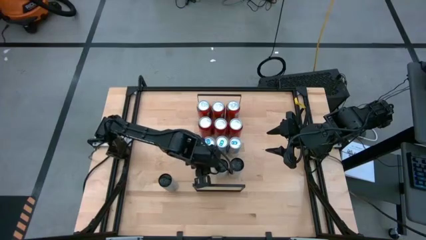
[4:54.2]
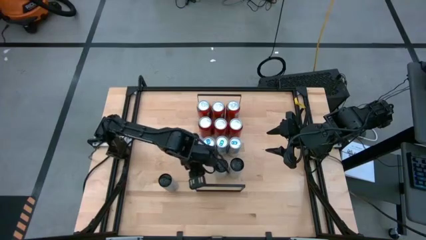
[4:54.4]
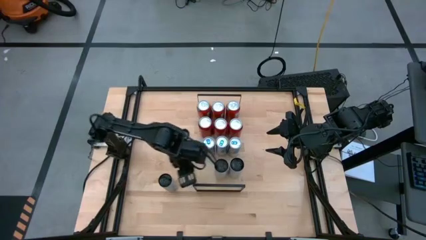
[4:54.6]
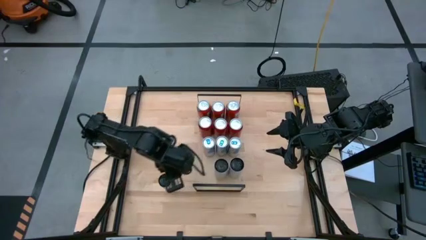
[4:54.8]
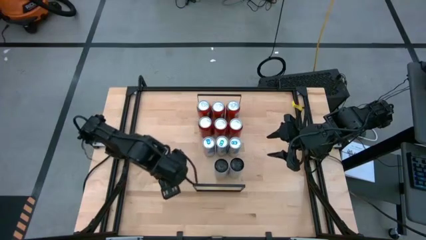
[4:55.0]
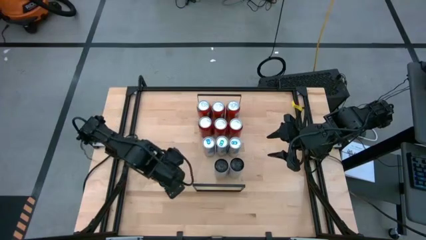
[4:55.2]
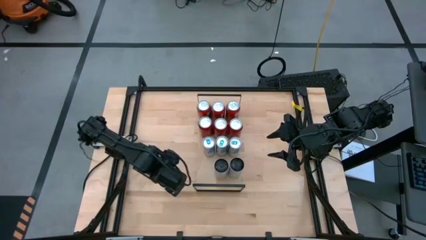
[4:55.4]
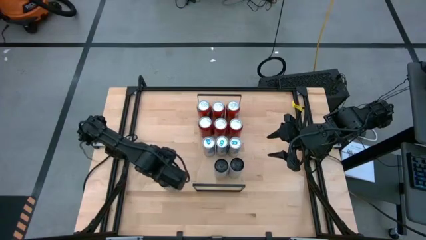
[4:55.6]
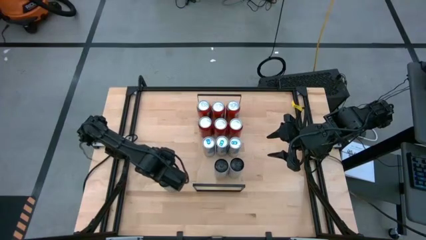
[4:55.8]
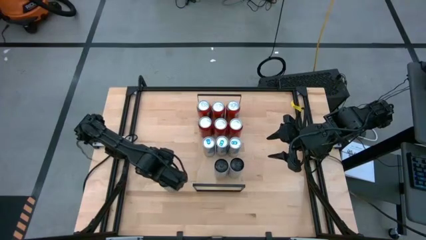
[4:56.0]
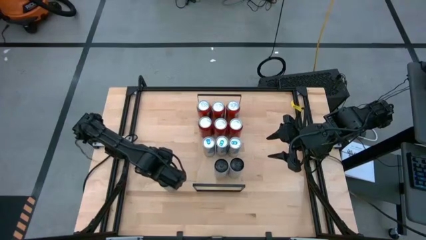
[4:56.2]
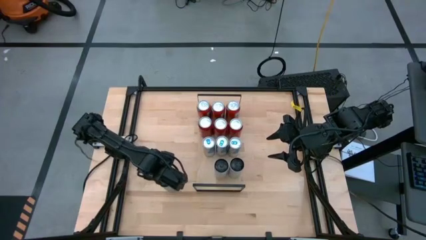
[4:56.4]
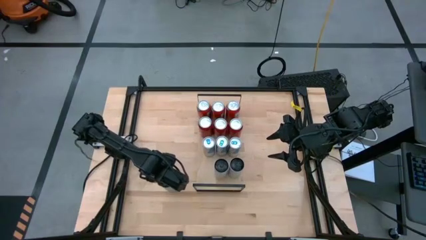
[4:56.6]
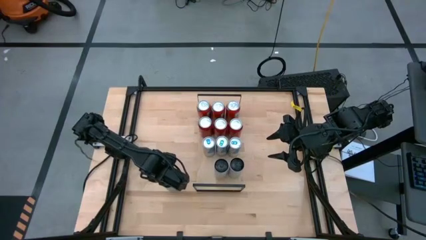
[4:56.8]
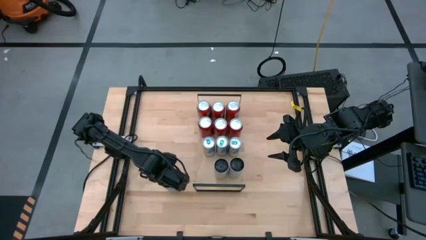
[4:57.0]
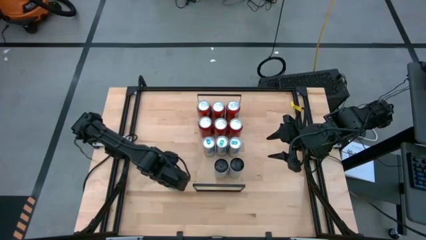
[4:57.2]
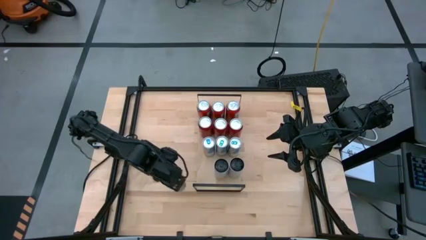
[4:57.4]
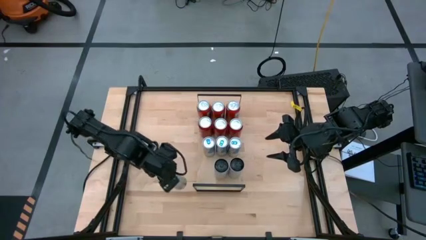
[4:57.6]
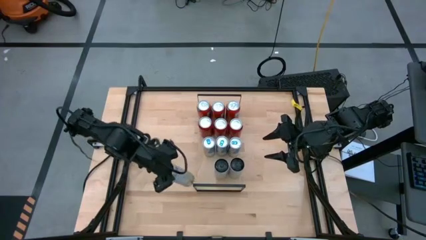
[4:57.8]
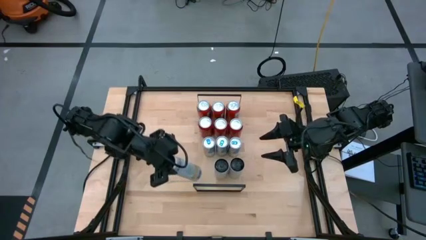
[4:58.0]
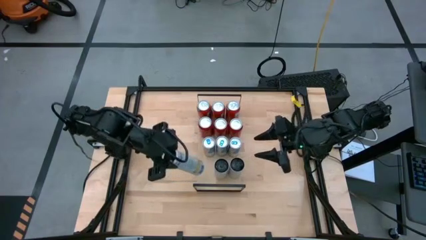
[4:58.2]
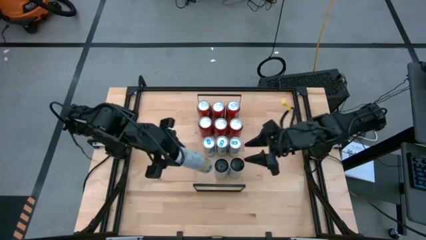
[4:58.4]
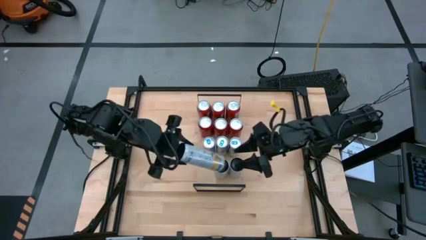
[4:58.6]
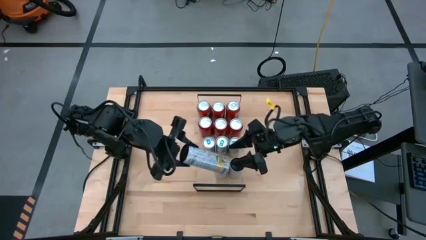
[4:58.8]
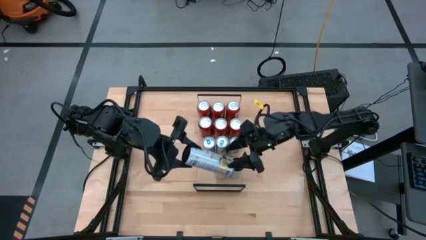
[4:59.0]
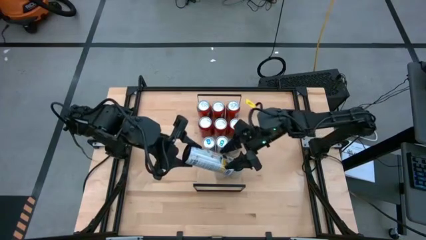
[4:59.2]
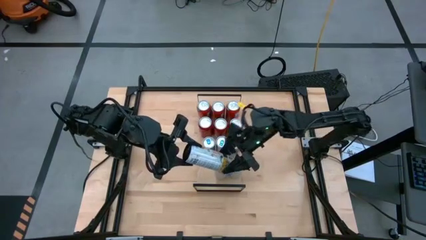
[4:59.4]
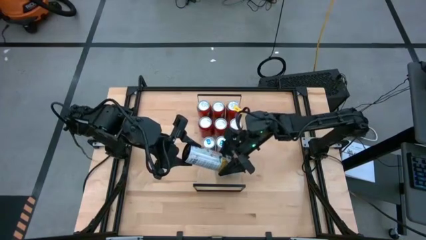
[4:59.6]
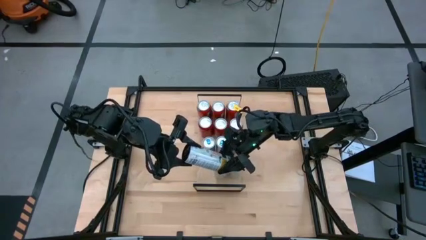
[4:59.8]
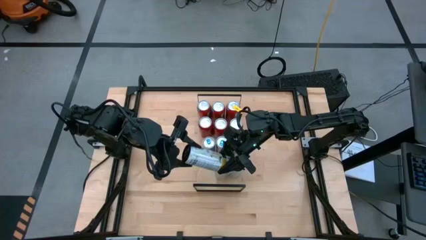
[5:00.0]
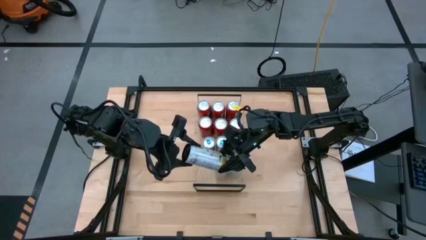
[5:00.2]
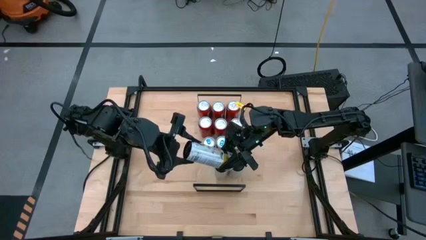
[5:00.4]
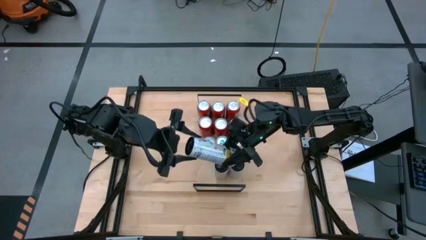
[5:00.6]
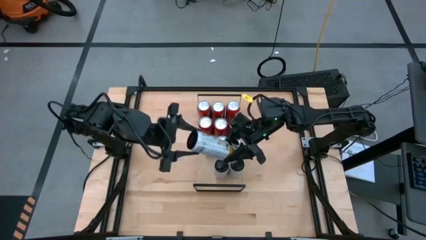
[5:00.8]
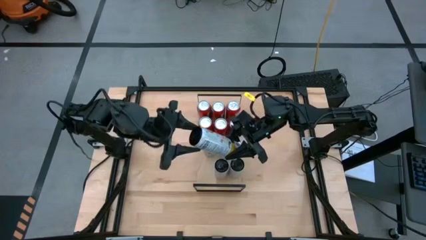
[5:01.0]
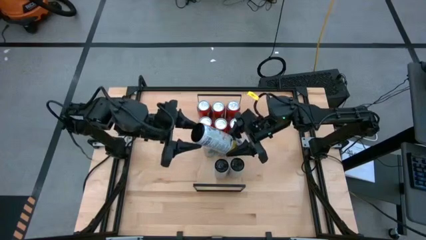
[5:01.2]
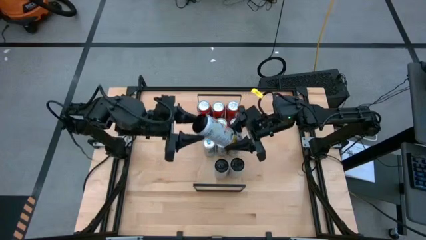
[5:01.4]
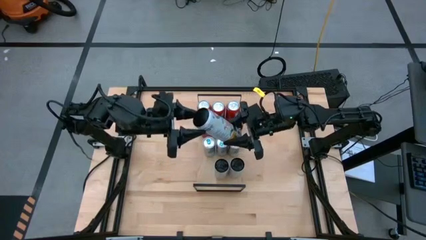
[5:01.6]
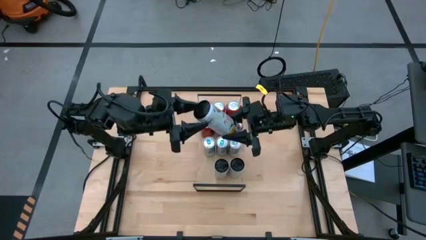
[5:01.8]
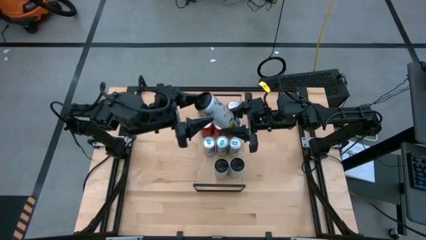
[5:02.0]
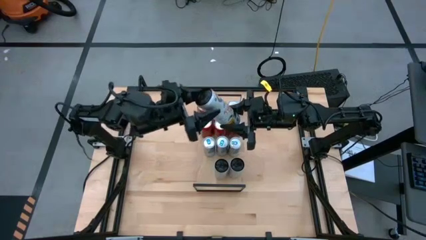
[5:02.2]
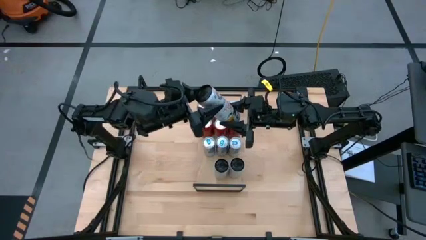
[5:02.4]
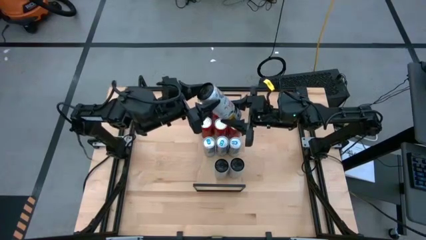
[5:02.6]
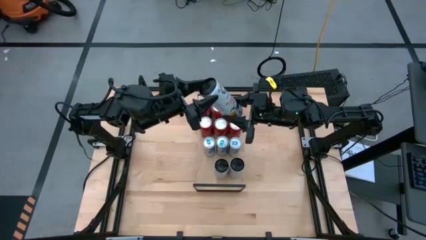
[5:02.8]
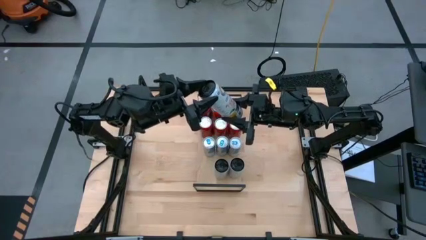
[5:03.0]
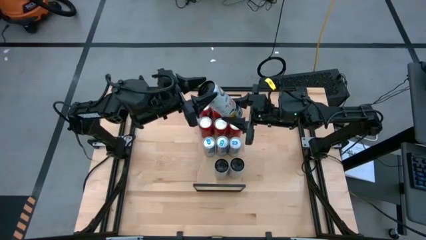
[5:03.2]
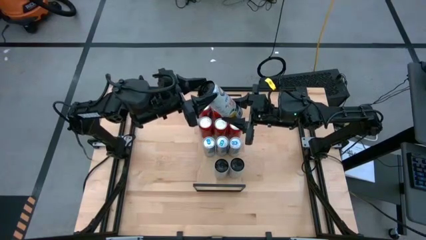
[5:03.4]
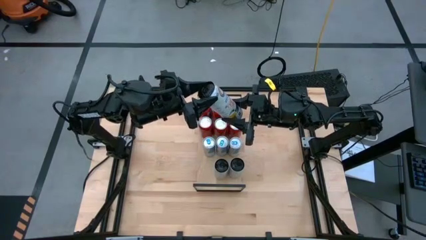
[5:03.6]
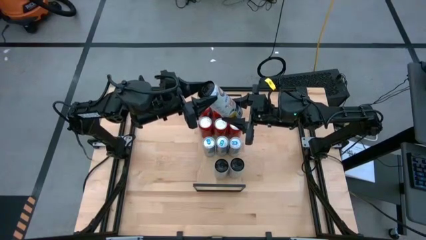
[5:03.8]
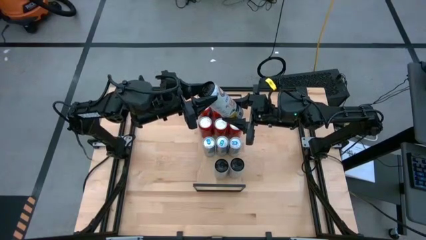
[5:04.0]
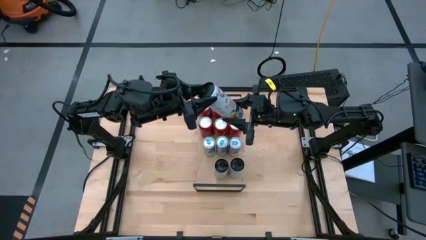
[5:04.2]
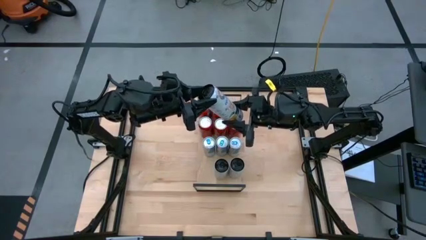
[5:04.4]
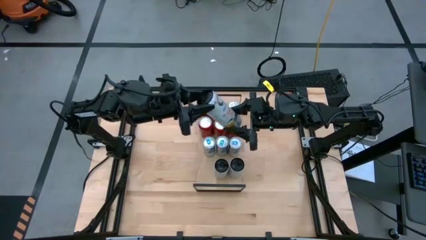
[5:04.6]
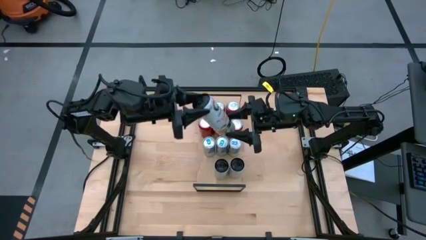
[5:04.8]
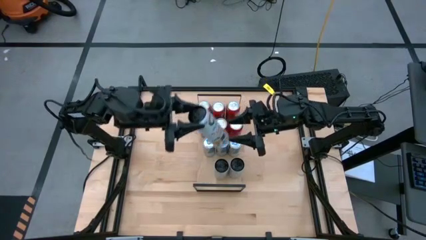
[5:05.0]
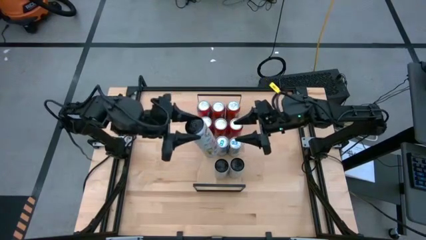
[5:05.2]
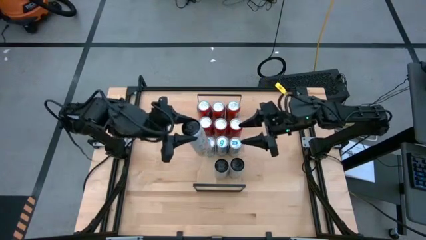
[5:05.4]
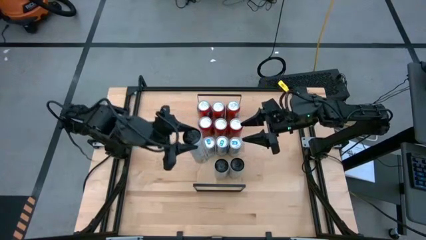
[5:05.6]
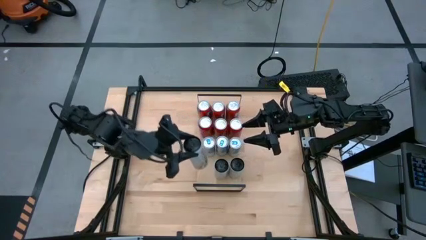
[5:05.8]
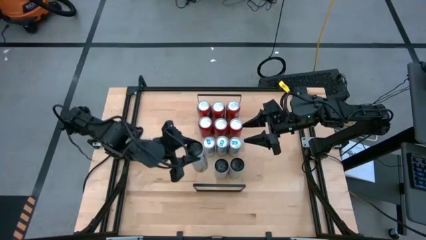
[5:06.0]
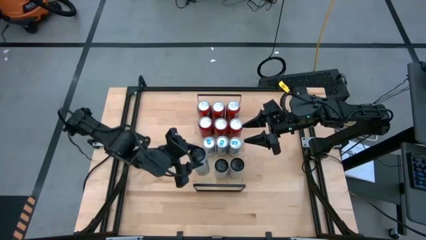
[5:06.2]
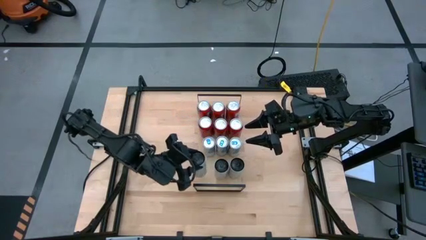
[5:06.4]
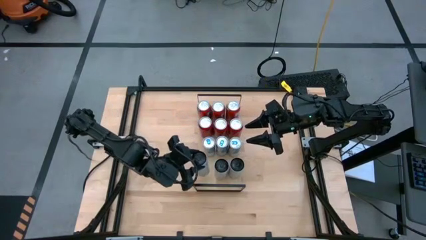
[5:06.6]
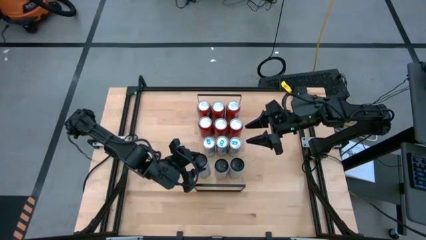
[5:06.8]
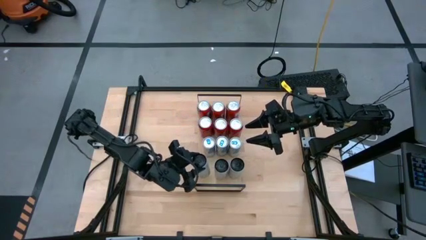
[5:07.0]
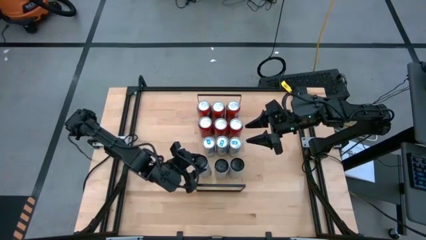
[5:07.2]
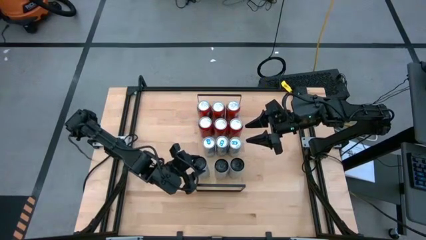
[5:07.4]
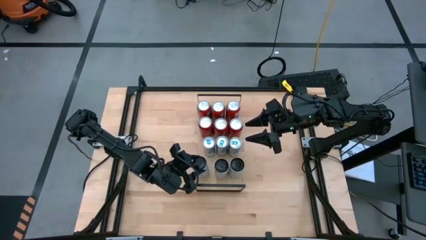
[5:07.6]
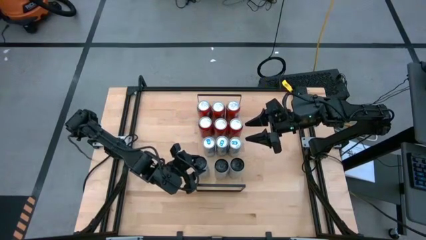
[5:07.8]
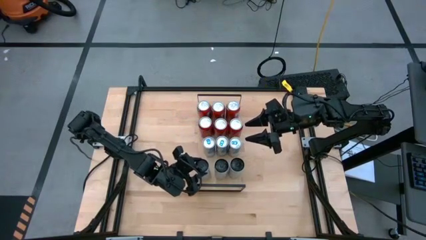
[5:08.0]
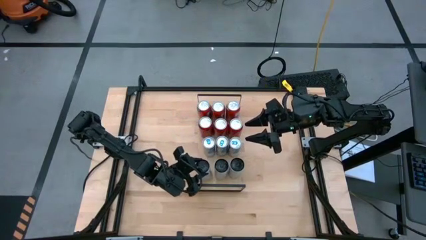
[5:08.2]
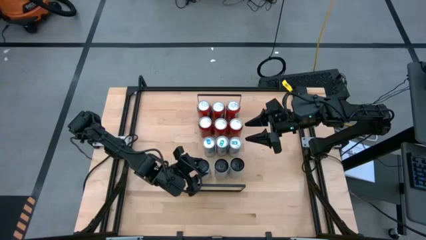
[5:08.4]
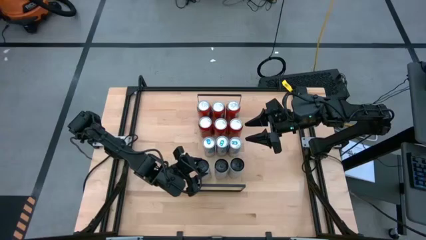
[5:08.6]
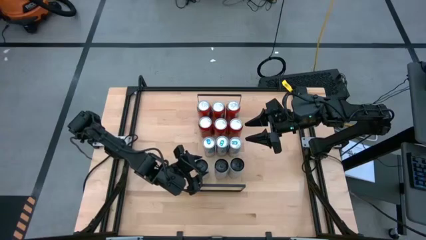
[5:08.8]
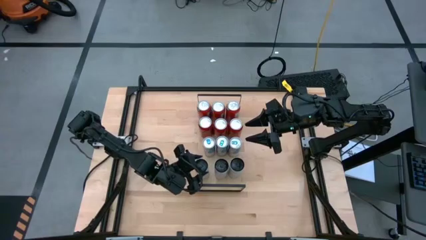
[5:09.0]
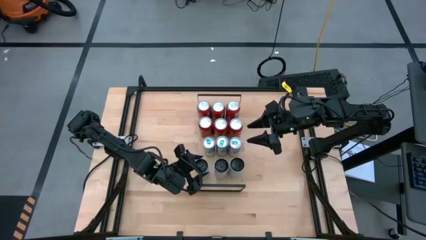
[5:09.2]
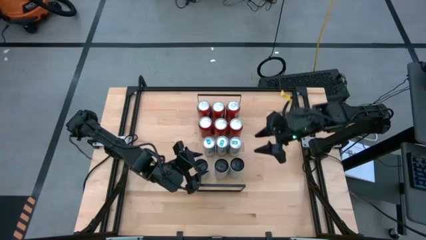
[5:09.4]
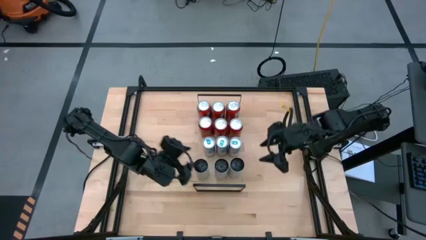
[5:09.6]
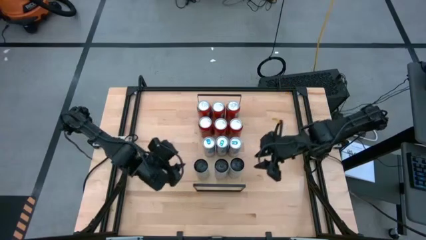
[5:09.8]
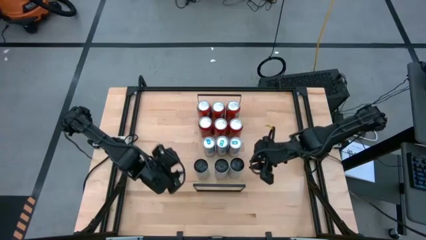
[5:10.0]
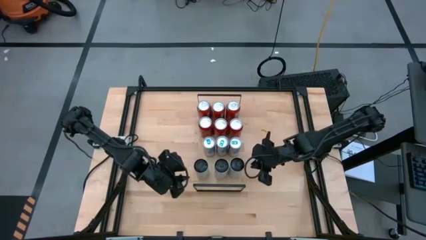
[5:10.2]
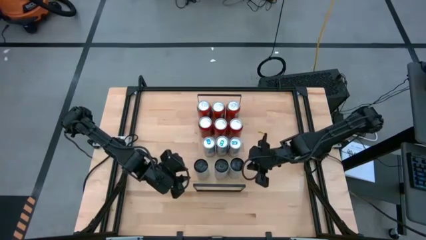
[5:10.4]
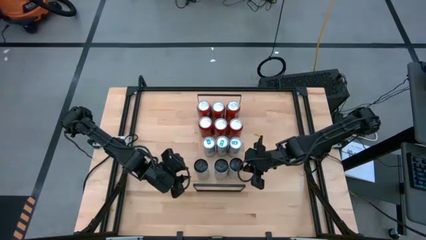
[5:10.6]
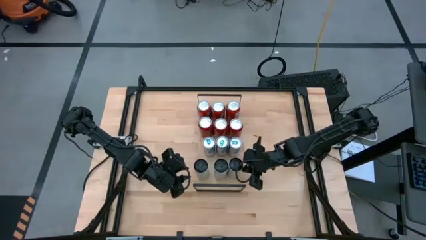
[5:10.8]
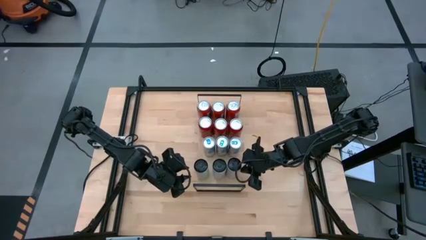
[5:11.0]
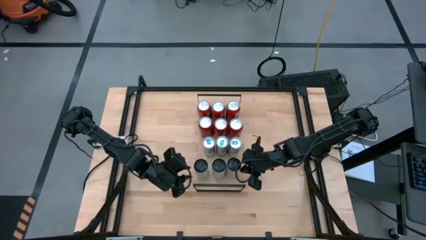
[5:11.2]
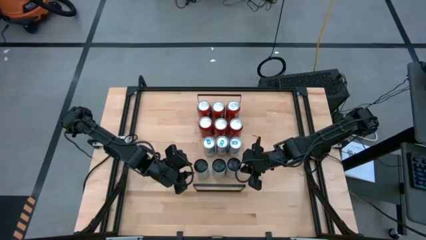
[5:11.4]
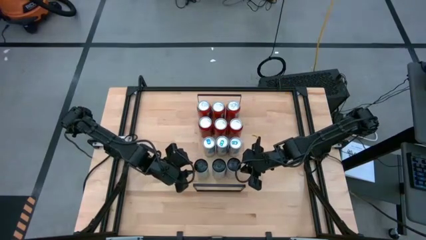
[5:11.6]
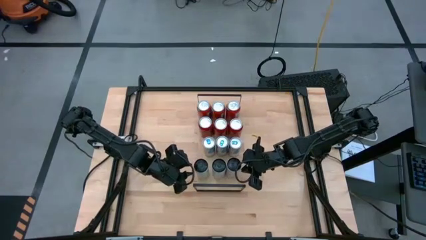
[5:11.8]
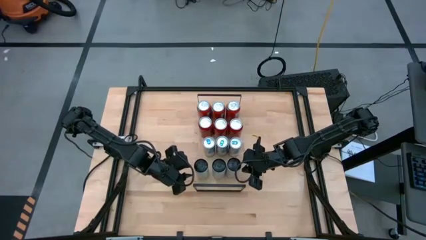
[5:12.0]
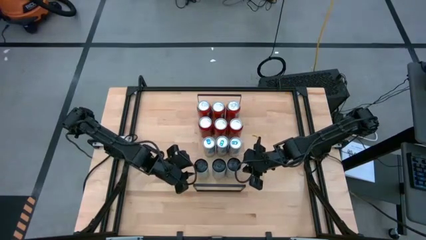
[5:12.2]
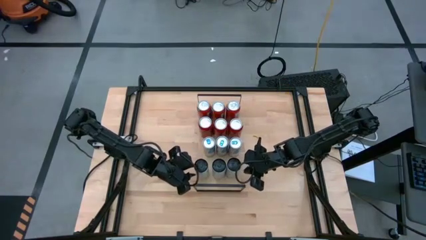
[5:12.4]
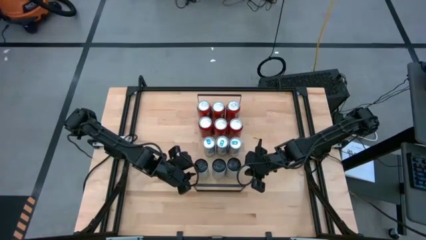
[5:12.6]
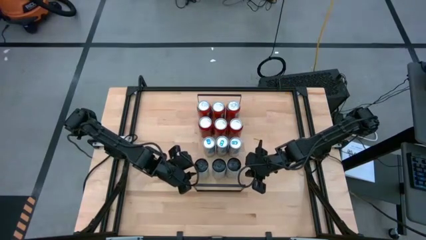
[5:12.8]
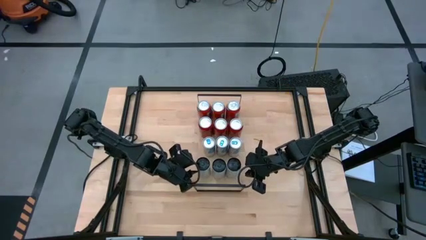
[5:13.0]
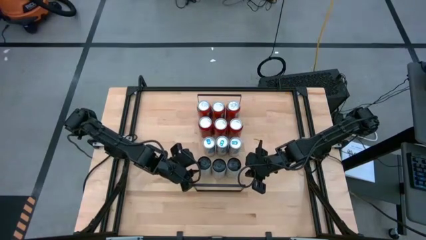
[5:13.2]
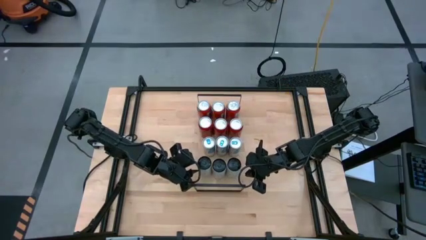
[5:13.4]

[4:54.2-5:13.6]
Task: Place canned beverage on shelf
Put the white yellow soda can on the shelf aligned with the other white yellow soda can
